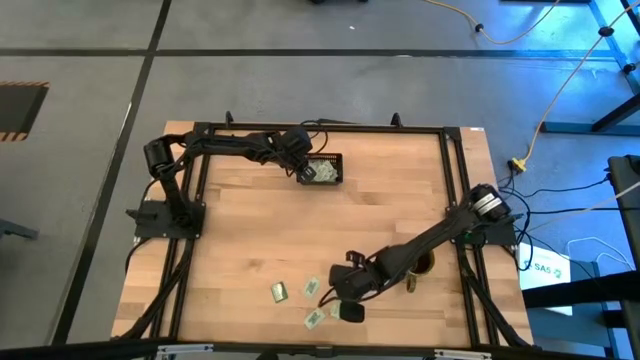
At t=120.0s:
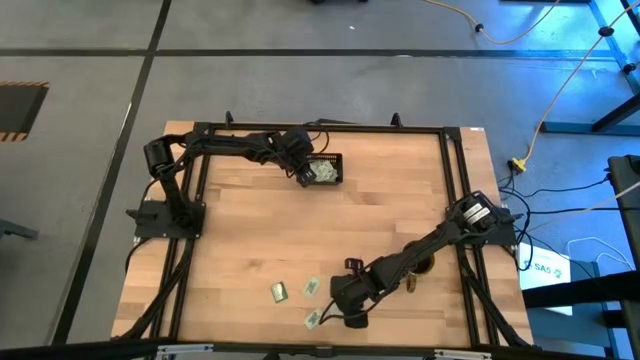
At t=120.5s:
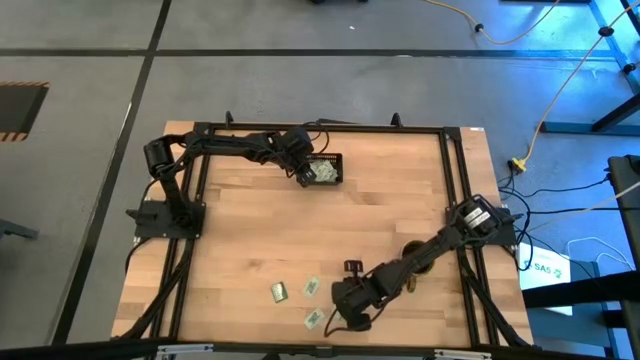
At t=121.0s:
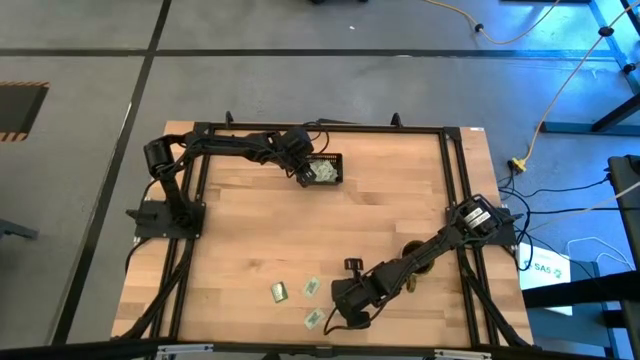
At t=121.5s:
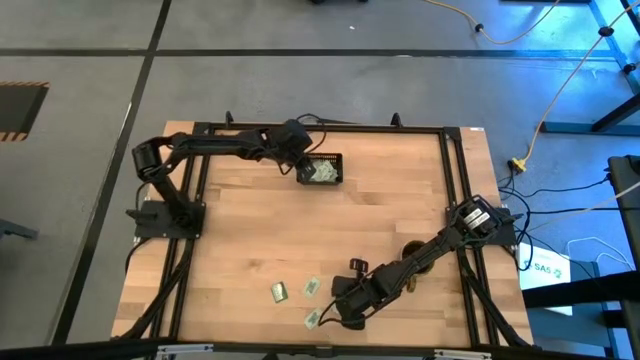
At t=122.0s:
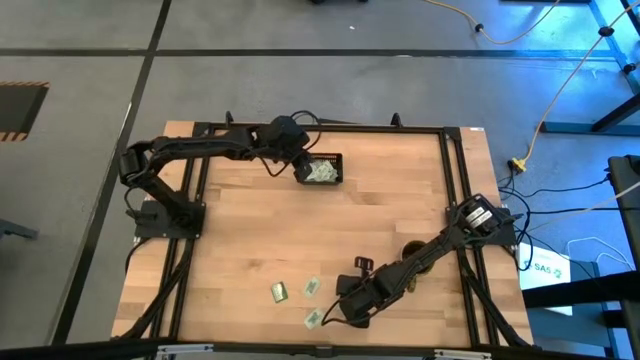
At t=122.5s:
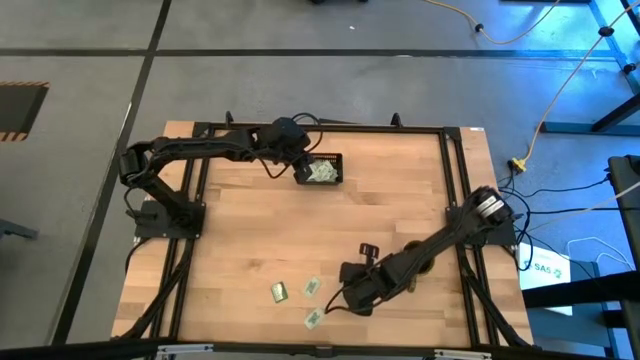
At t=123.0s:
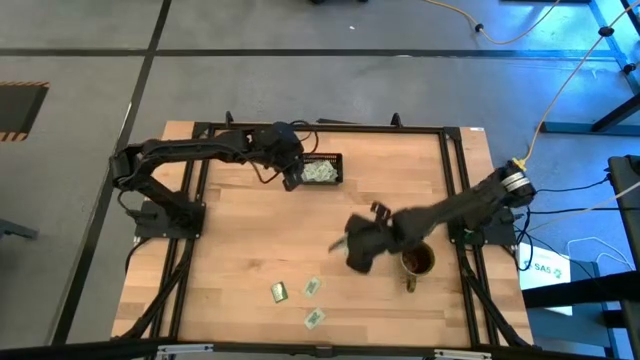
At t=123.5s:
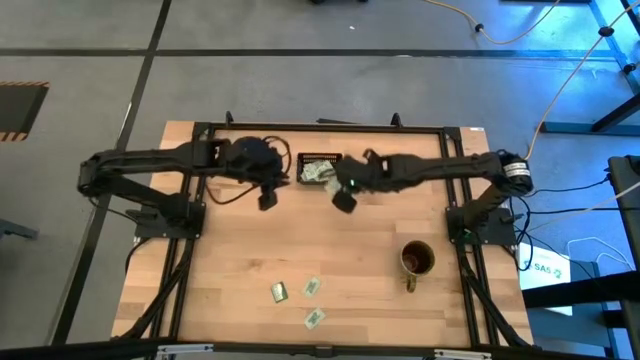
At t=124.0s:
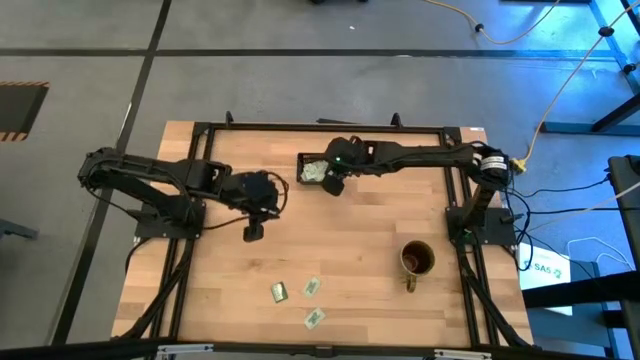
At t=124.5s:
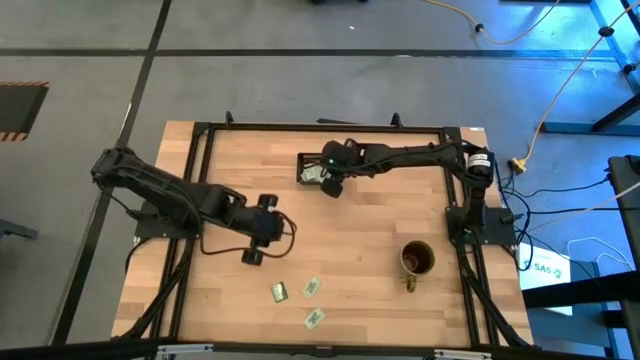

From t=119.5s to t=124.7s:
Task: Pick and place Stevia / Truvia into bins
Put the white stevia packet into the black bin

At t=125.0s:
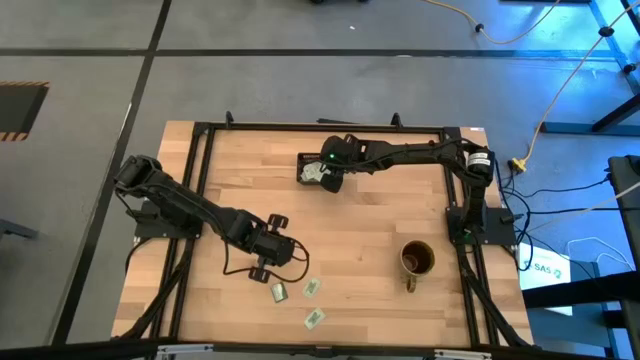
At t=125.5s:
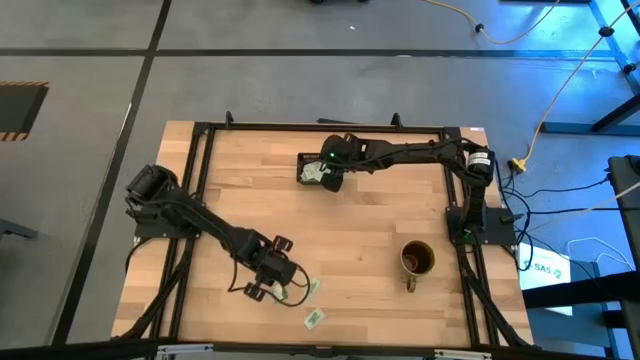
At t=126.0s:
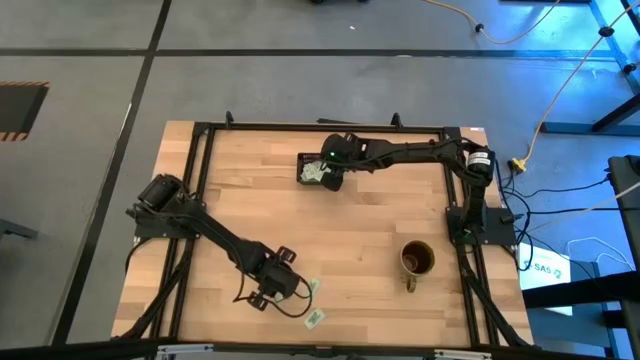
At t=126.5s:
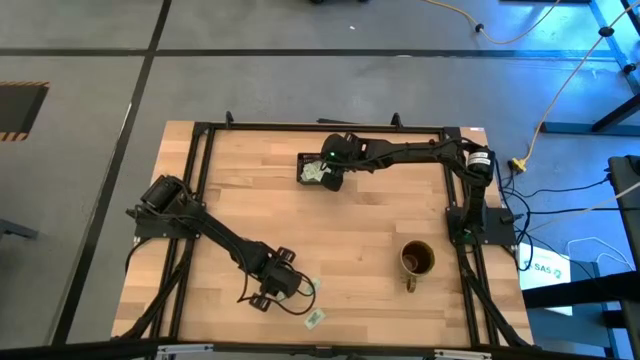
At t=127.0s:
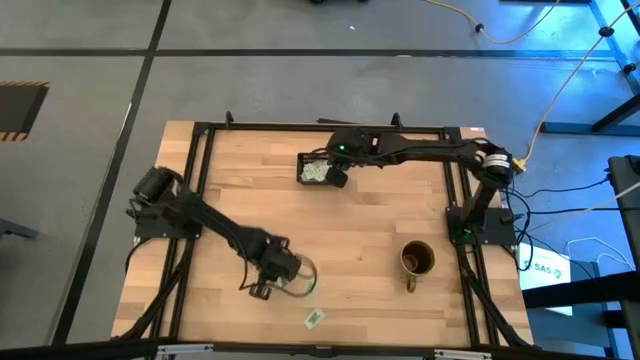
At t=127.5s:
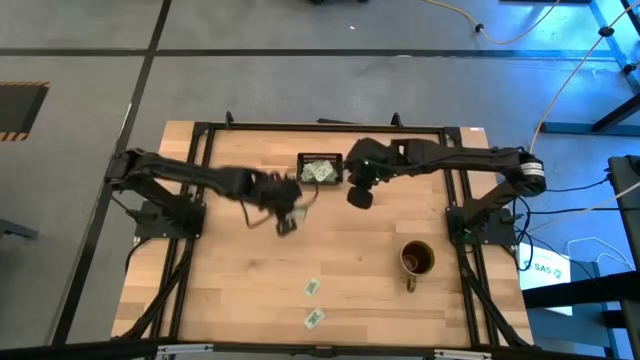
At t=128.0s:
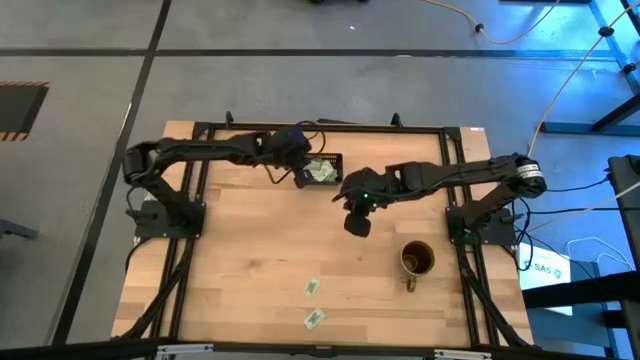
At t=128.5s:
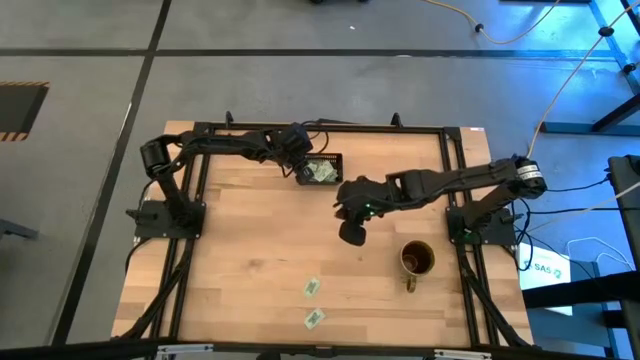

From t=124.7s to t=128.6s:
Put the green stevia packet into the black bin

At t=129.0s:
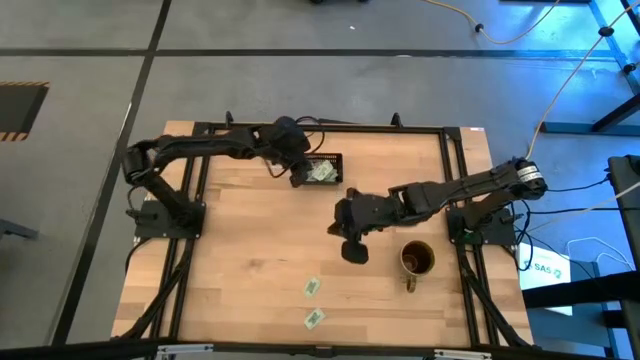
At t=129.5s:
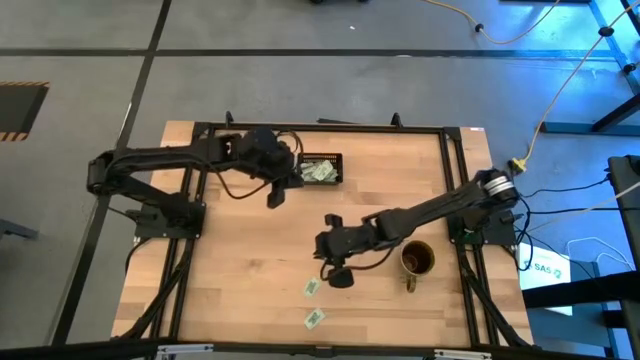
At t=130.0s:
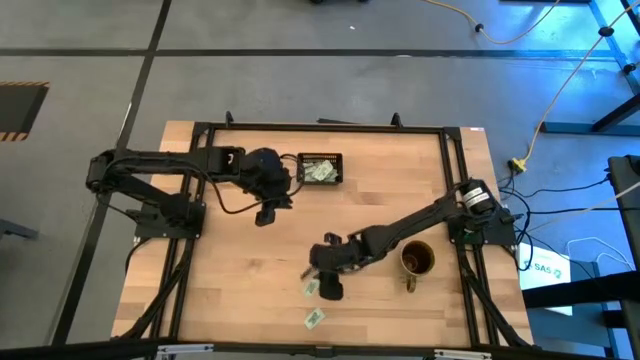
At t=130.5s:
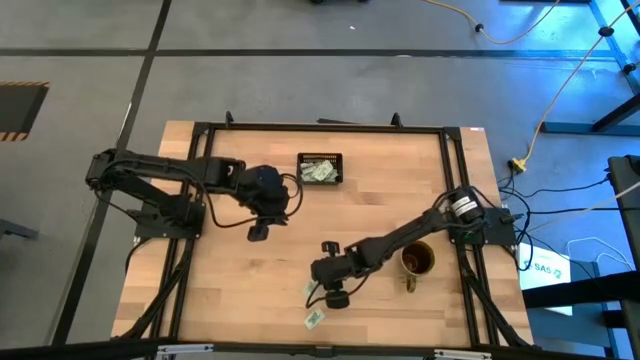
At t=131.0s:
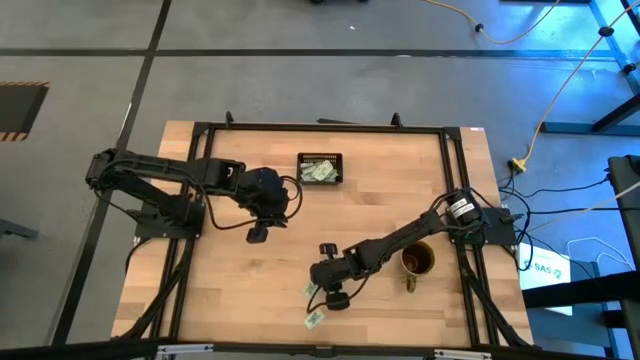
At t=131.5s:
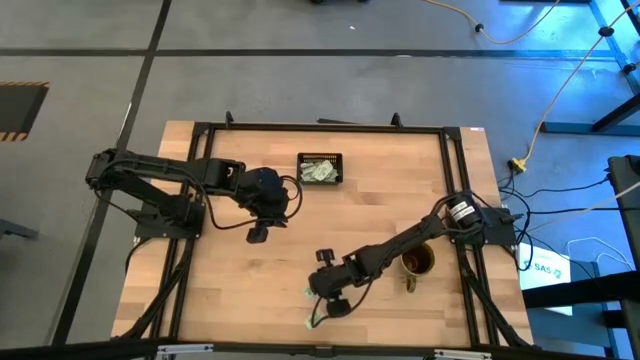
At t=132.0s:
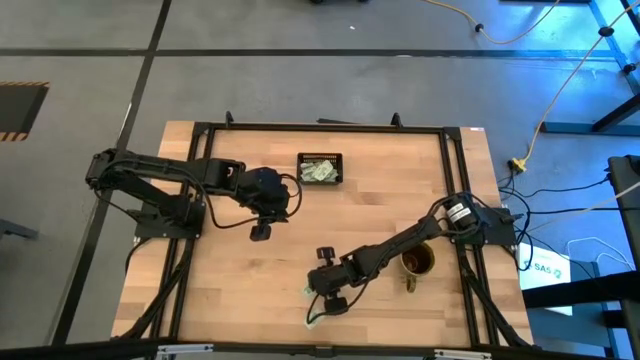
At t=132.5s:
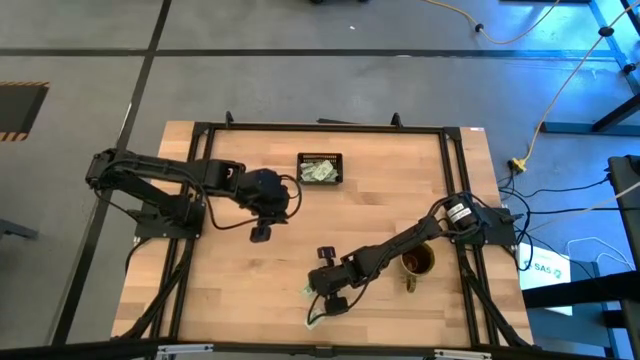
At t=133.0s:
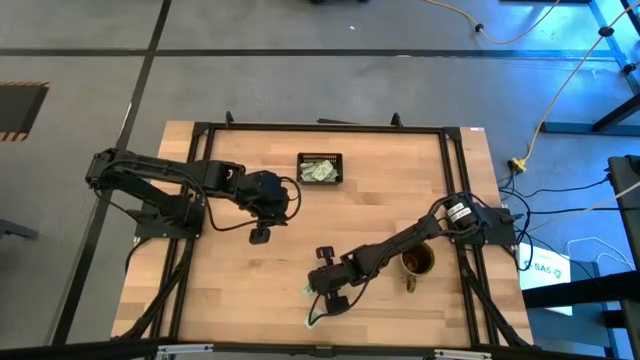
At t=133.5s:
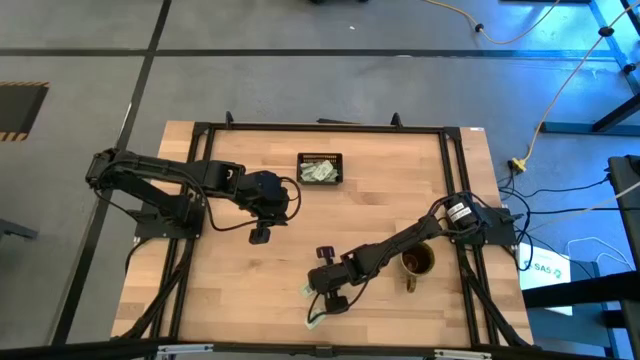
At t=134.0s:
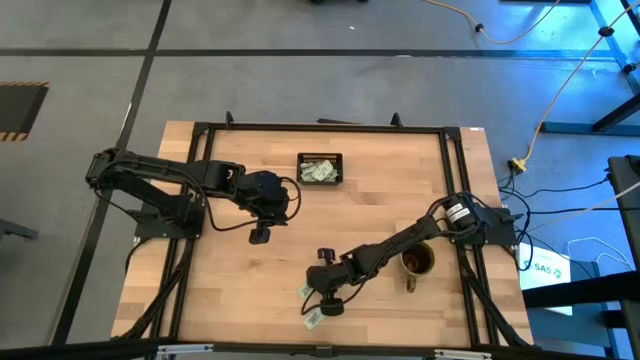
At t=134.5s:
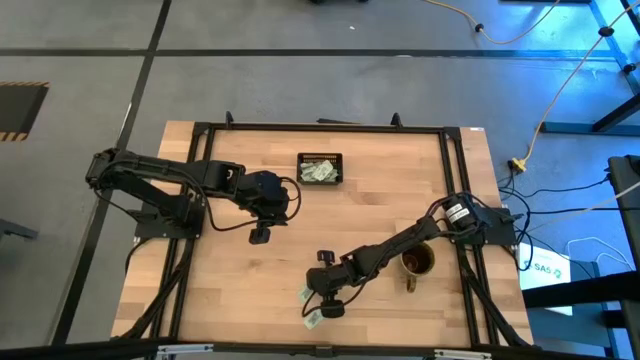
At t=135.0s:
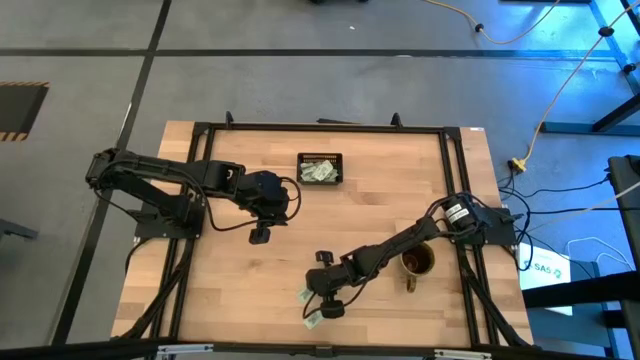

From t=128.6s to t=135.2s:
Put the white stevia packet into the black bin

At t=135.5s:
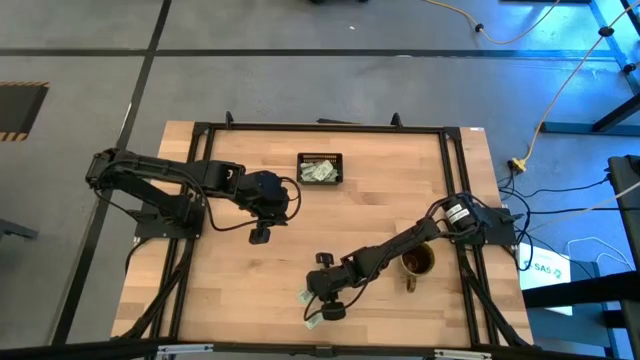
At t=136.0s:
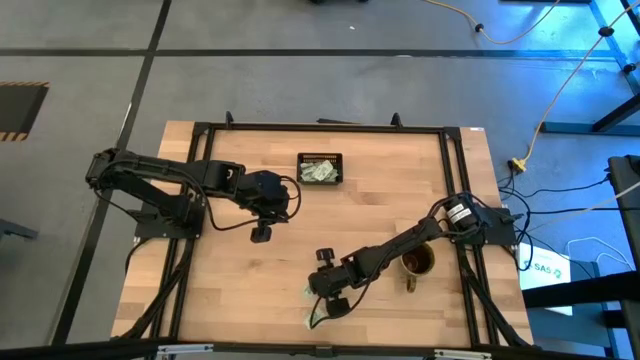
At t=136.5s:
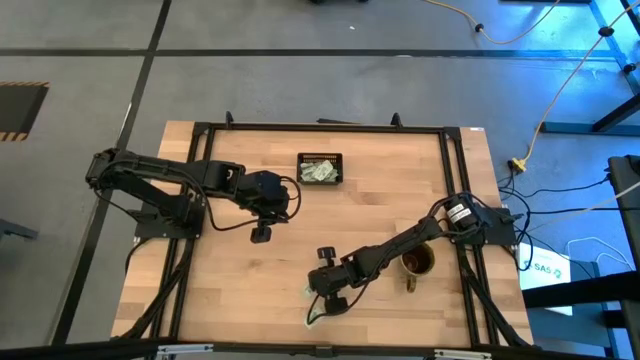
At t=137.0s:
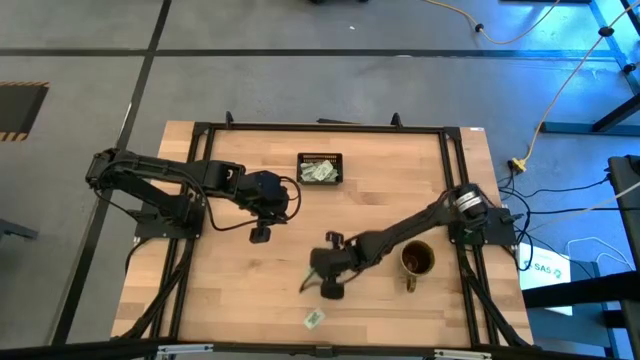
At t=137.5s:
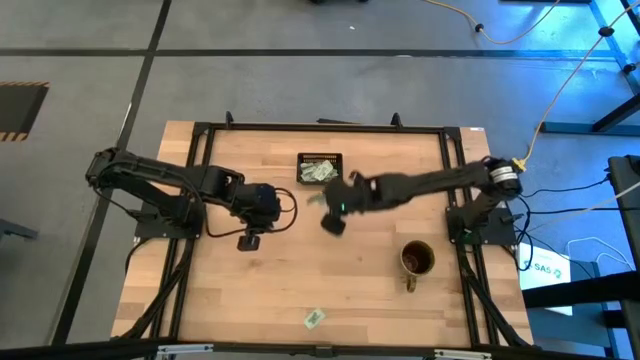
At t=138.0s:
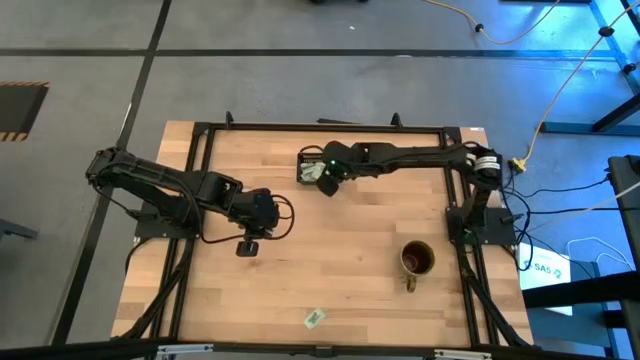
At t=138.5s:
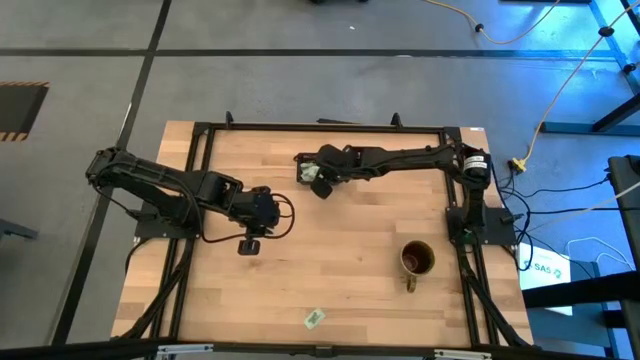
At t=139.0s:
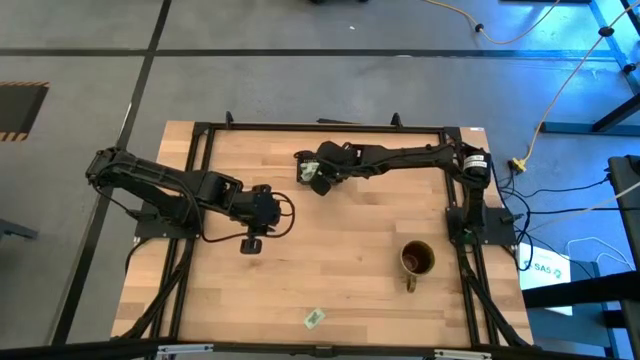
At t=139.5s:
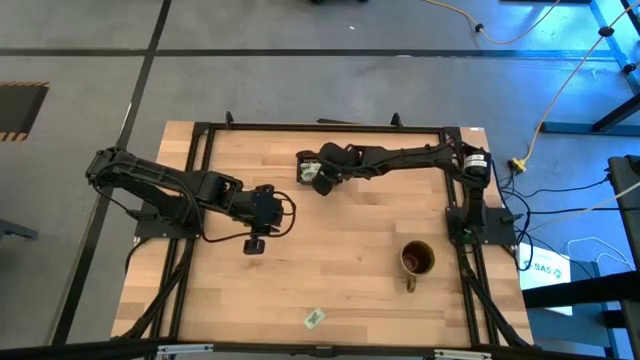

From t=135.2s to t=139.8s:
Put the white stevia packet into the black bin
